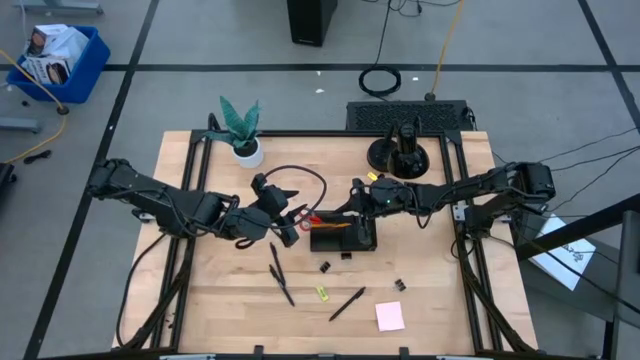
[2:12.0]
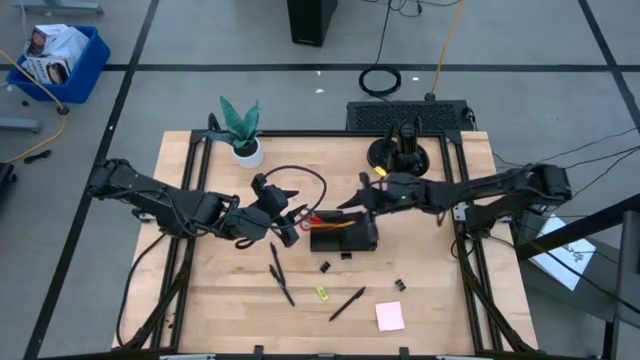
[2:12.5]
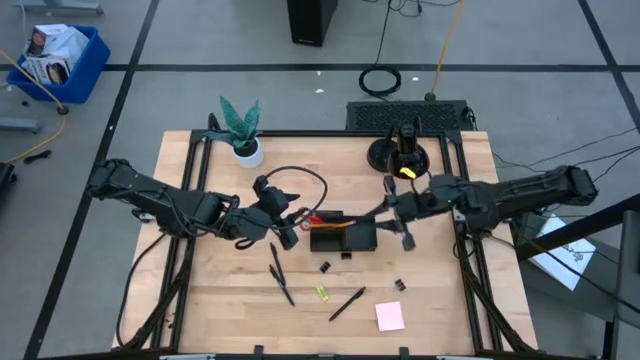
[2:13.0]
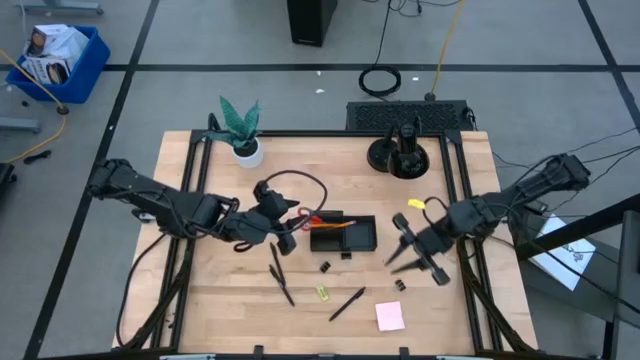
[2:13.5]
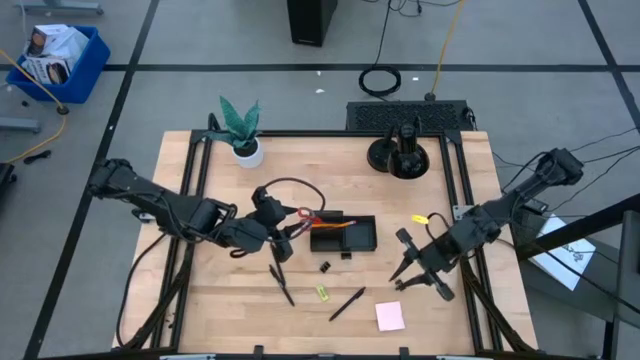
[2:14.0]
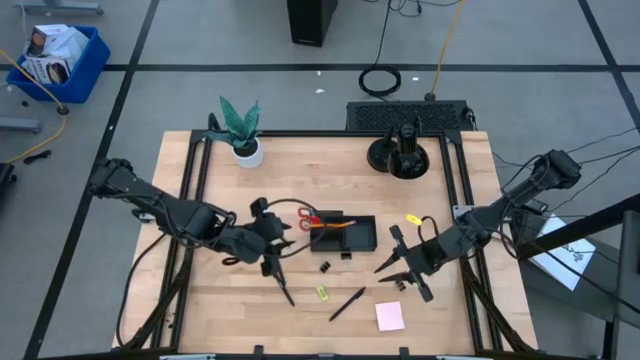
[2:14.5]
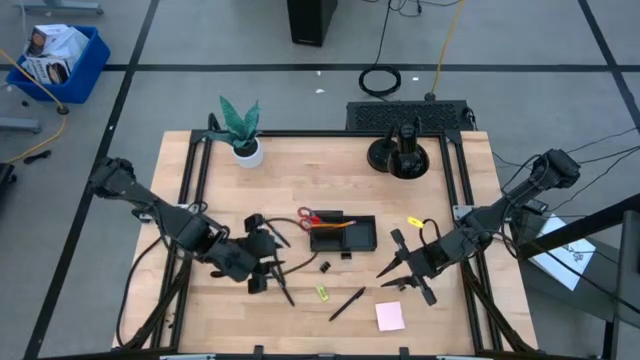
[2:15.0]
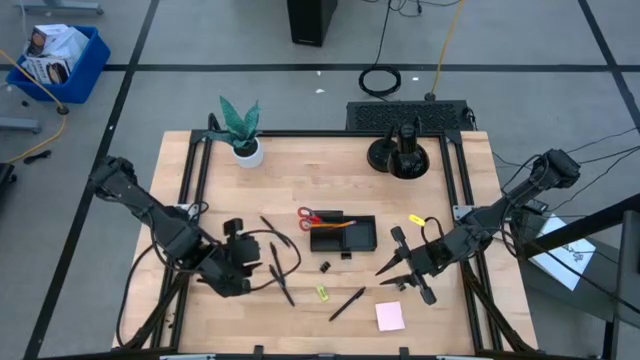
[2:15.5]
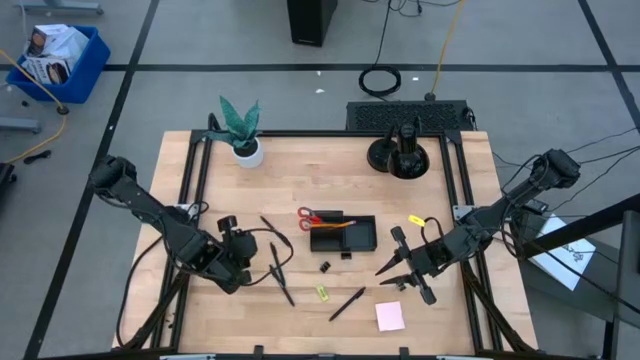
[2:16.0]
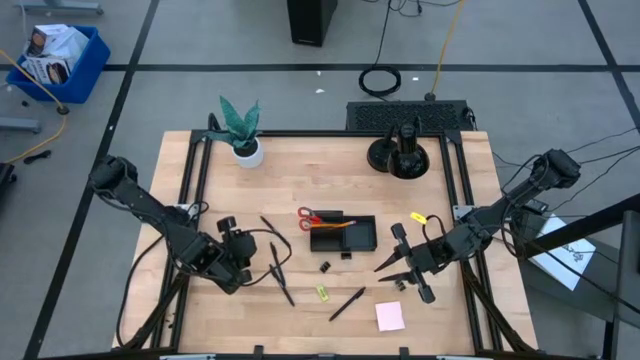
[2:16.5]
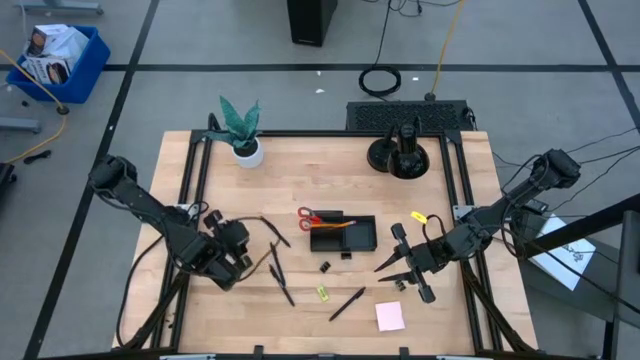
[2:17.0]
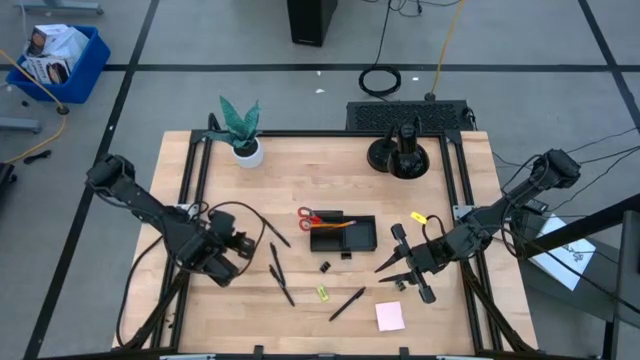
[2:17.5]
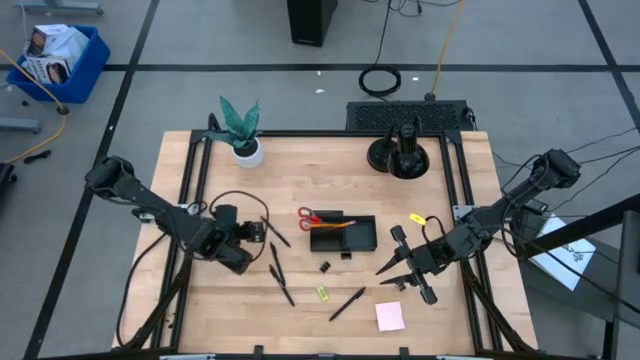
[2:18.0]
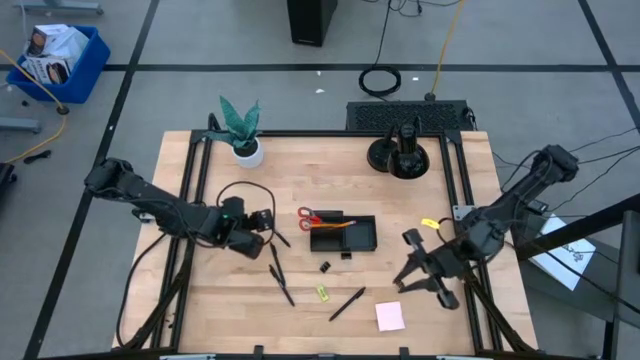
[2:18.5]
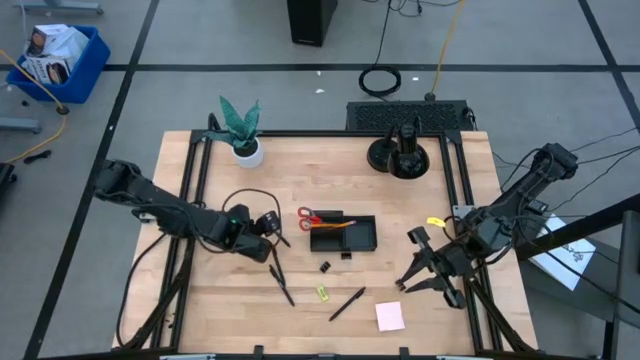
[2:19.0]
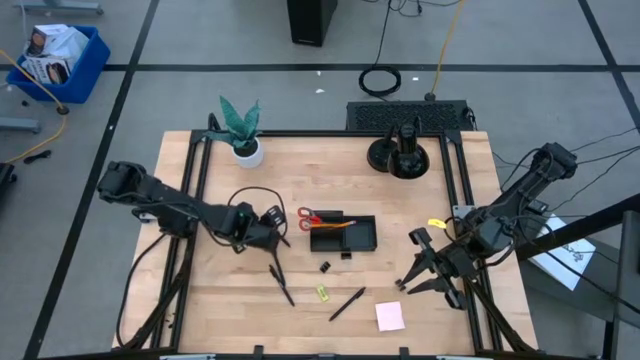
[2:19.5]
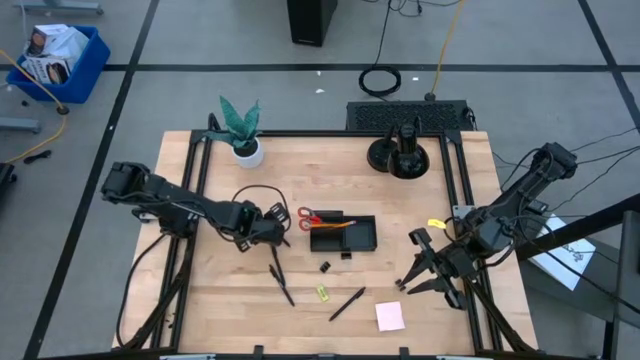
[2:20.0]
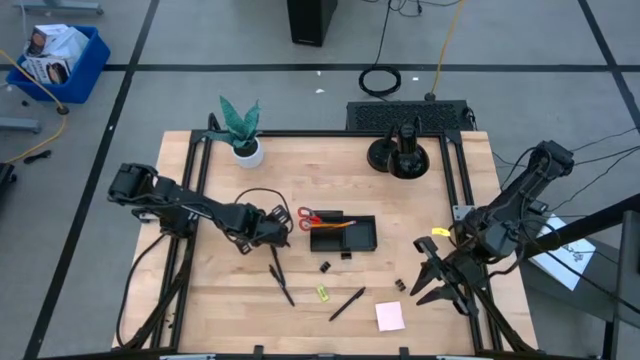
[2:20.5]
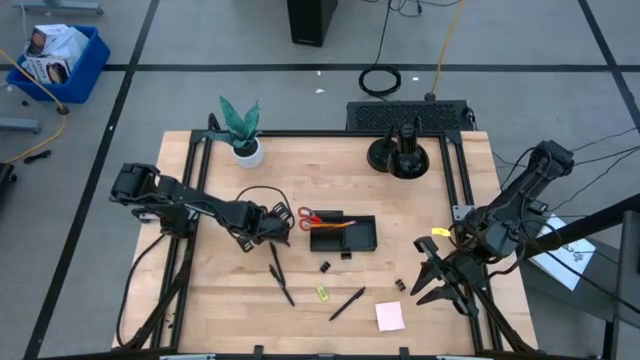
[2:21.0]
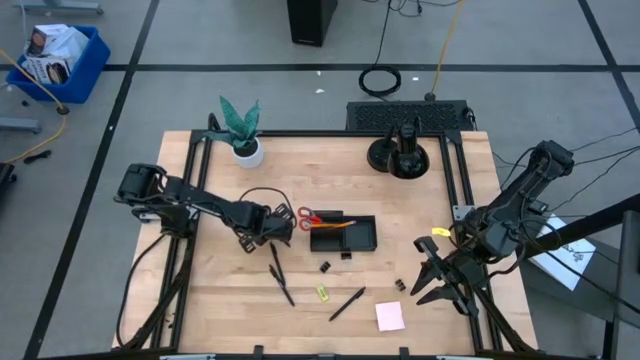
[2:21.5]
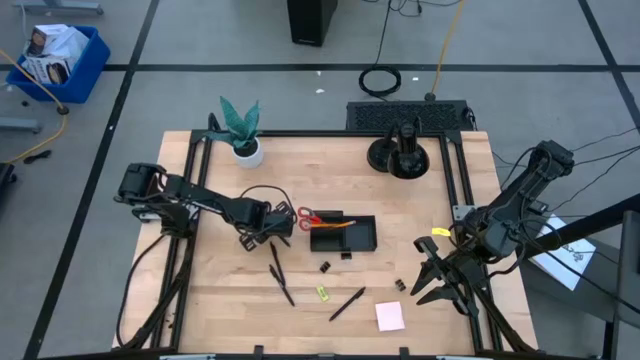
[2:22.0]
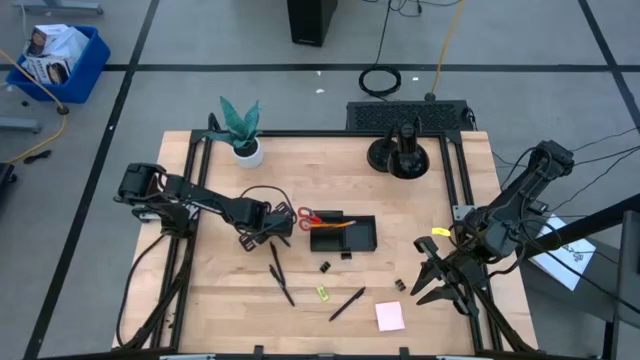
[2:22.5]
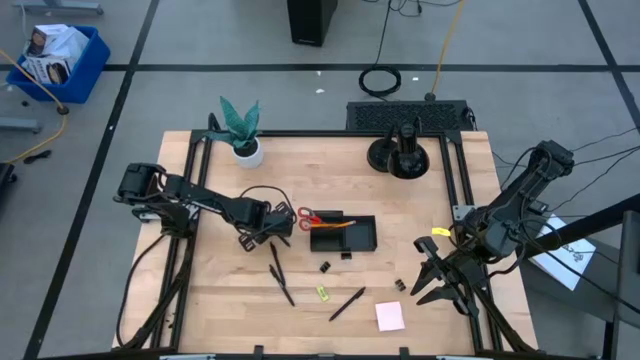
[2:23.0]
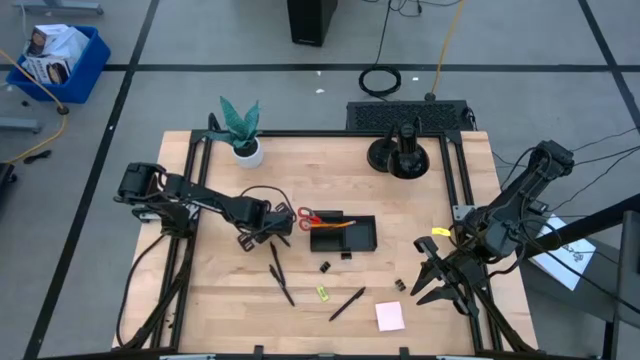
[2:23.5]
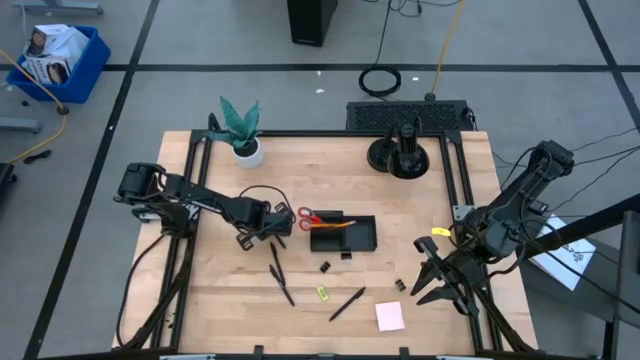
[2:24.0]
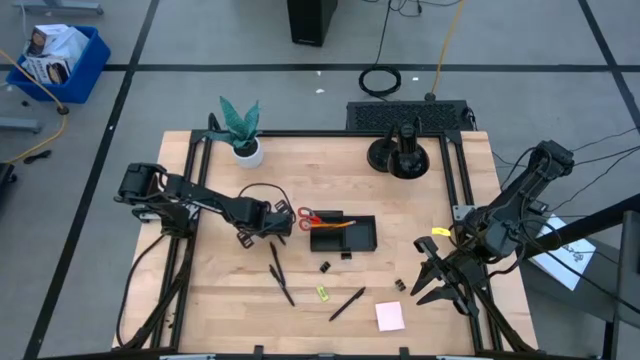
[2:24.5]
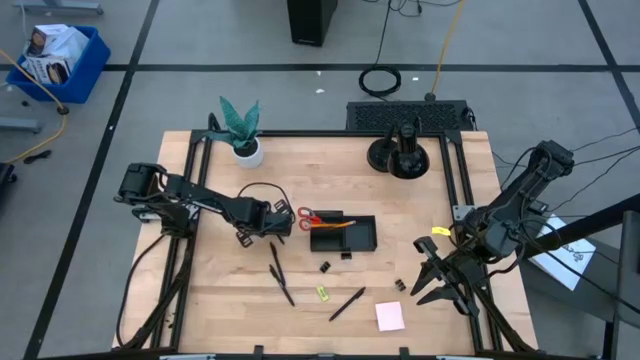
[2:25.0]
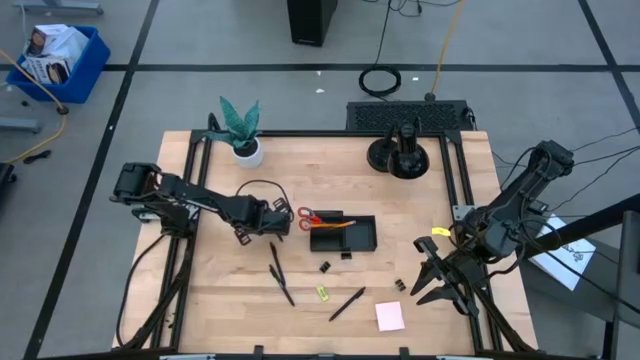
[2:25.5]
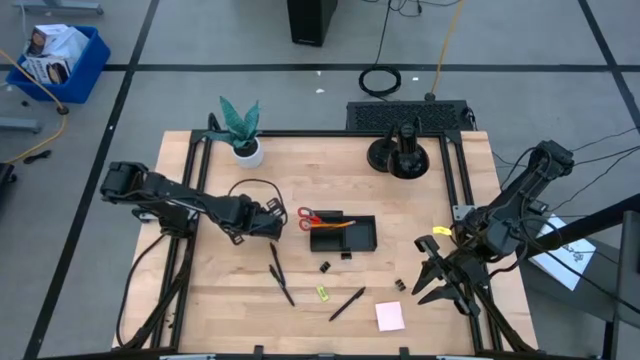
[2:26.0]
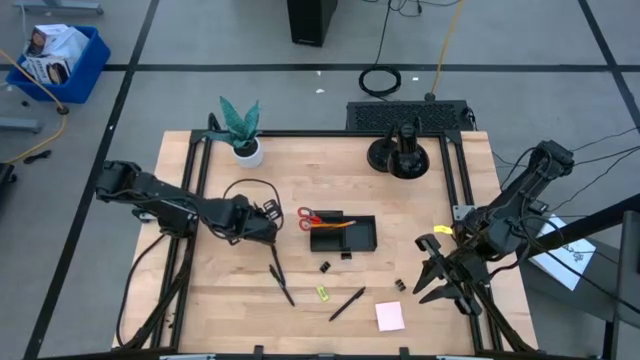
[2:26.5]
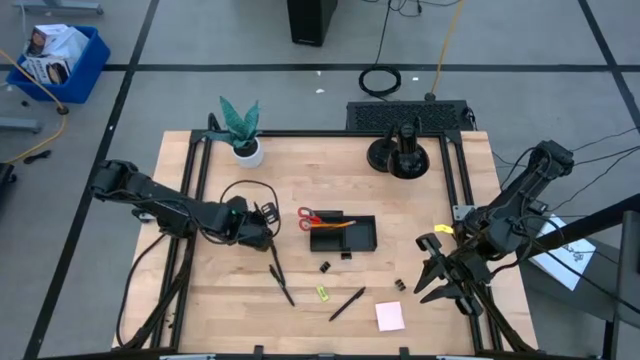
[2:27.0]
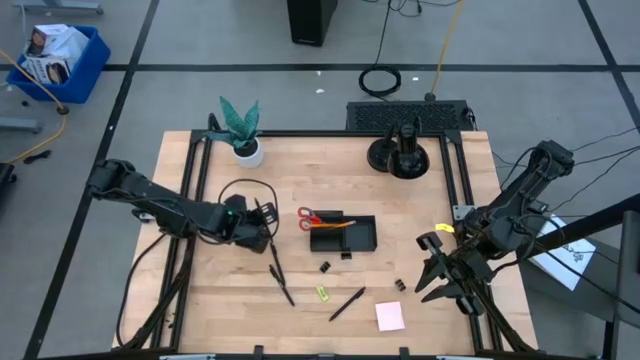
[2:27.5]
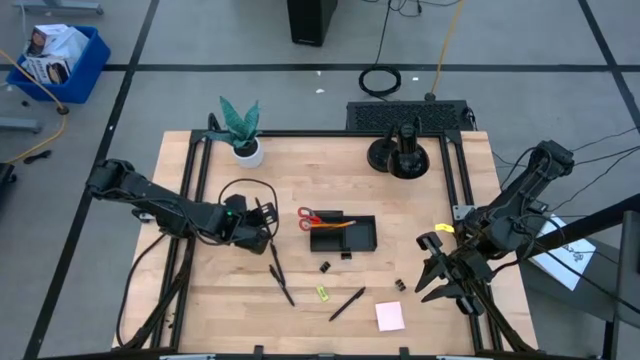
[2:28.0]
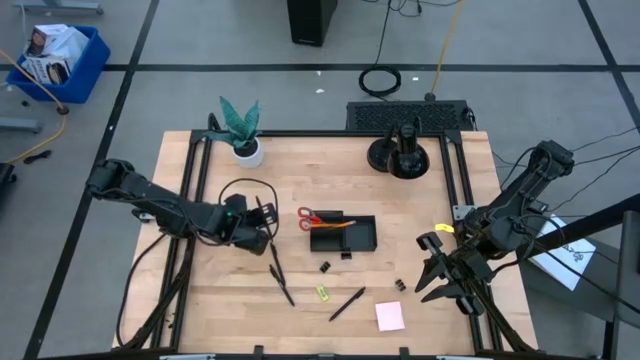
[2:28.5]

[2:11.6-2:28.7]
Task: Pick and place office supplies into organizer
Put the top left black pen into the black desk organizer

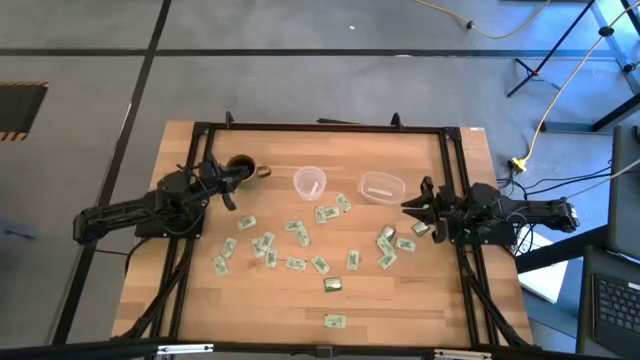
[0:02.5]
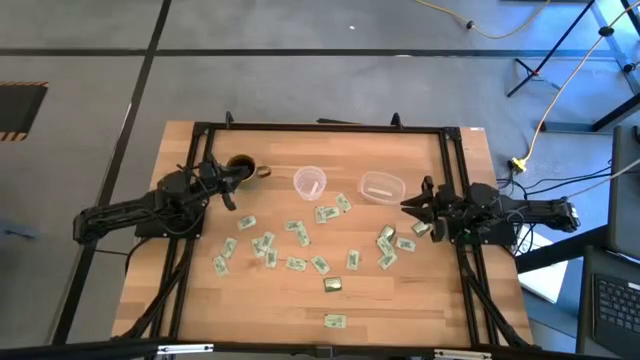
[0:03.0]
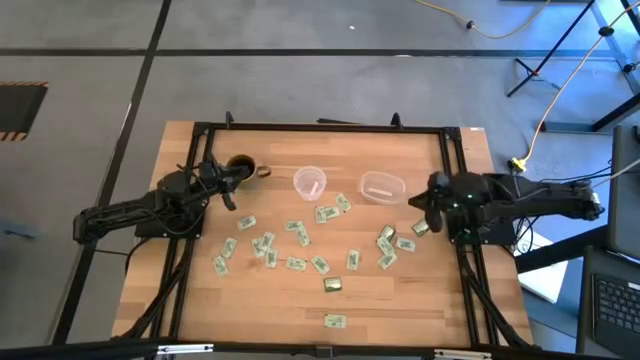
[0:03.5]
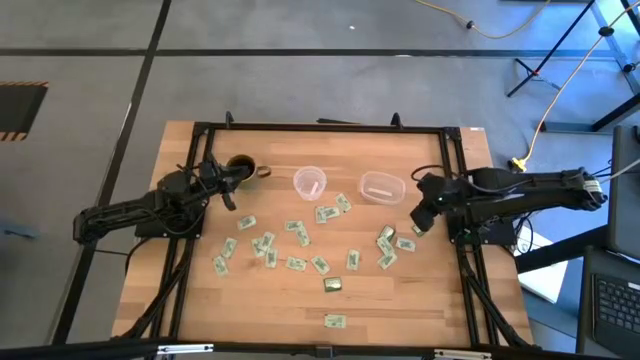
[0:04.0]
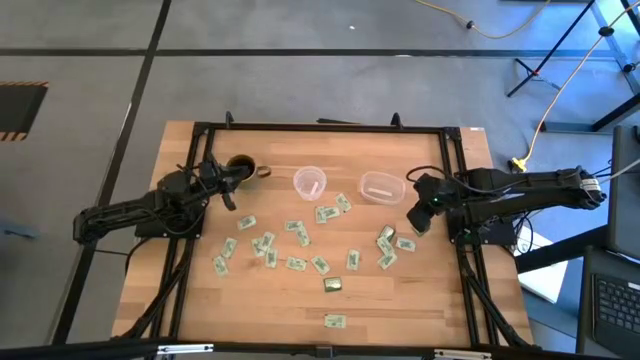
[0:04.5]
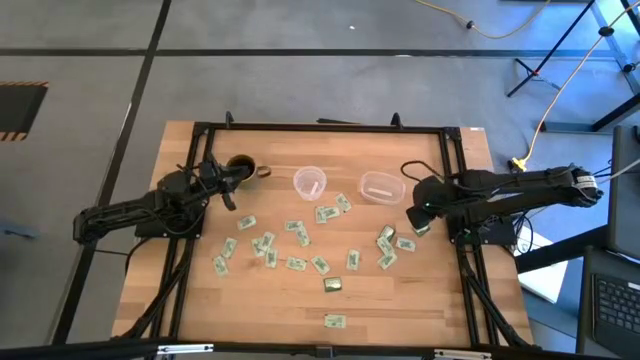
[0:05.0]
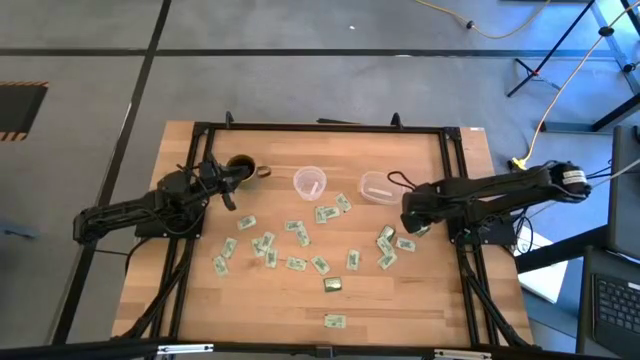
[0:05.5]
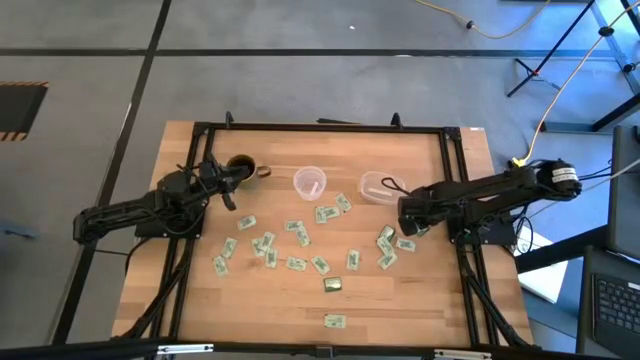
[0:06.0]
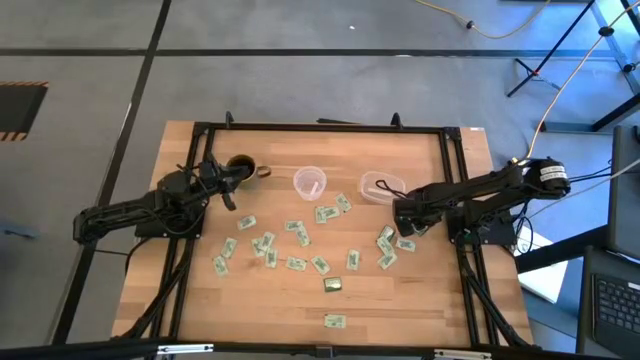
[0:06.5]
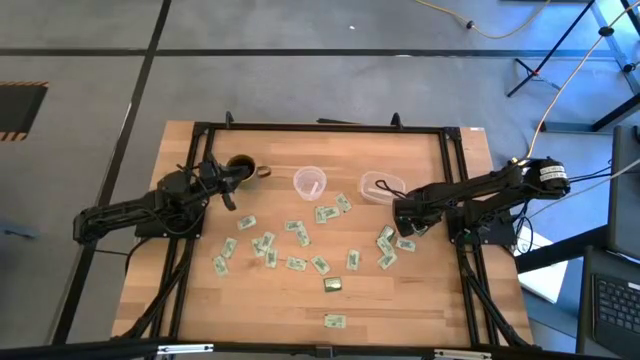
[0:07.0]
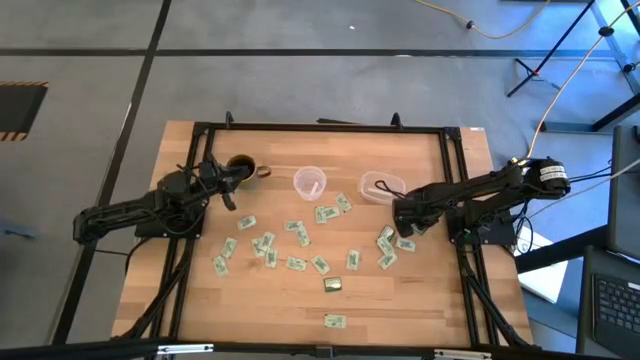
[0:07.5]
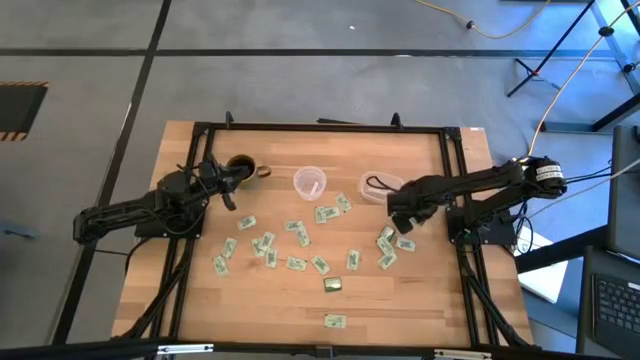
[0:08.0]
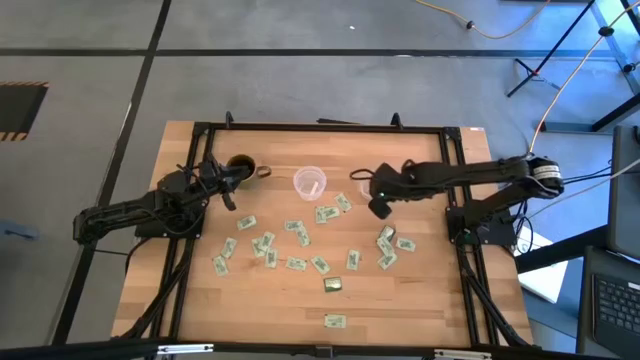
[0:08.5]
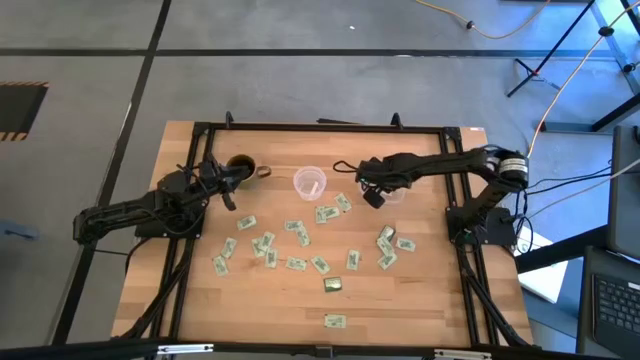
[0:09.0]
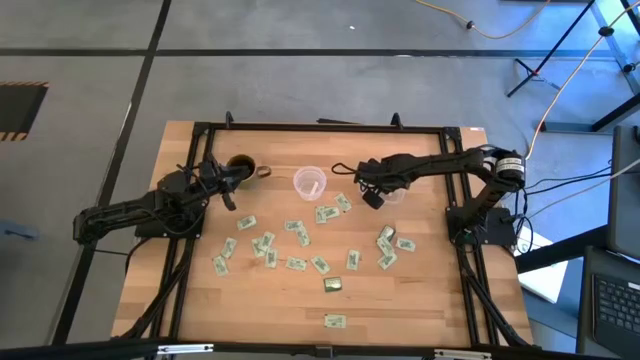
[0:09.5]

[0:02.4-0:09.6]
Task: Pick and place items into bin
Put the green stevia packet into the right transparent bin
